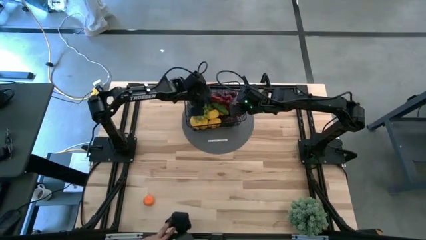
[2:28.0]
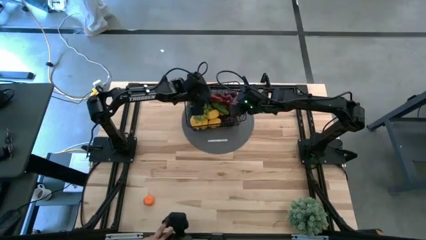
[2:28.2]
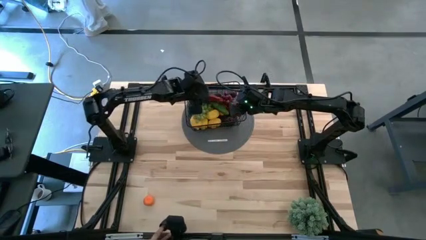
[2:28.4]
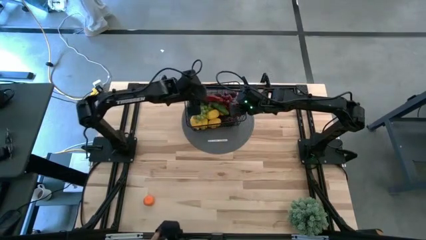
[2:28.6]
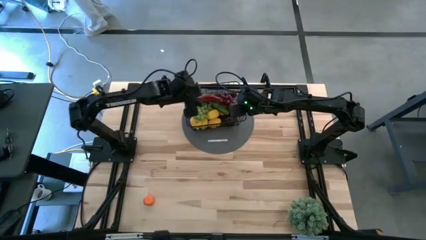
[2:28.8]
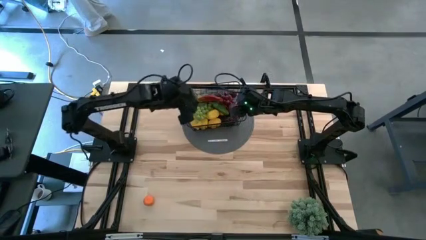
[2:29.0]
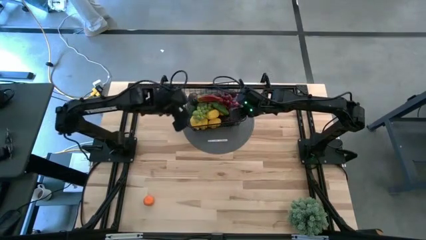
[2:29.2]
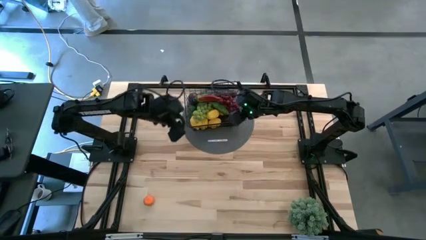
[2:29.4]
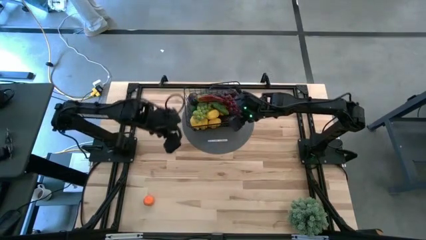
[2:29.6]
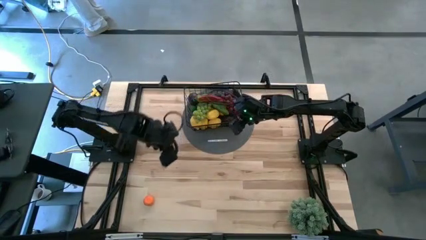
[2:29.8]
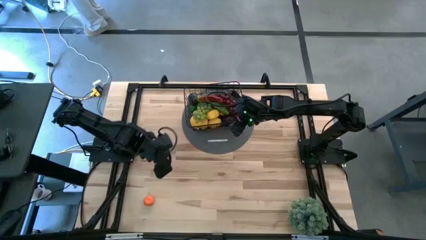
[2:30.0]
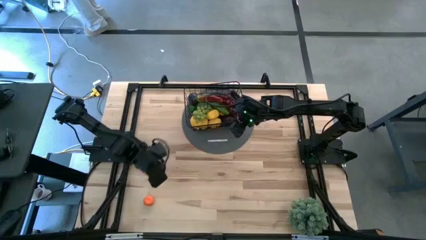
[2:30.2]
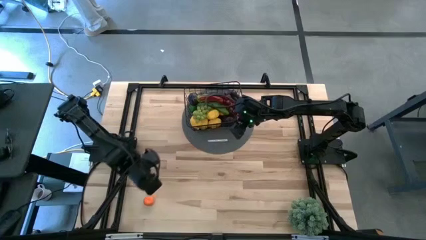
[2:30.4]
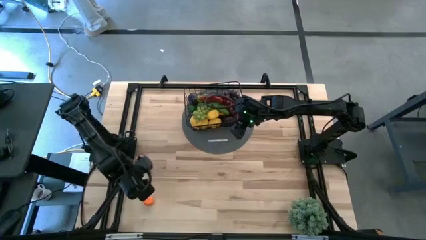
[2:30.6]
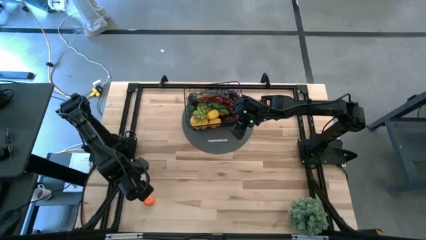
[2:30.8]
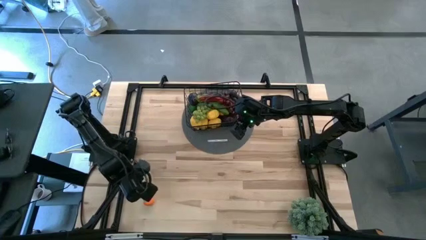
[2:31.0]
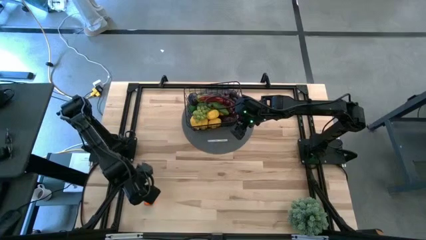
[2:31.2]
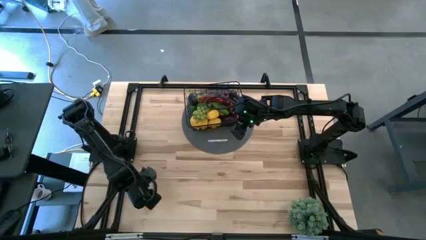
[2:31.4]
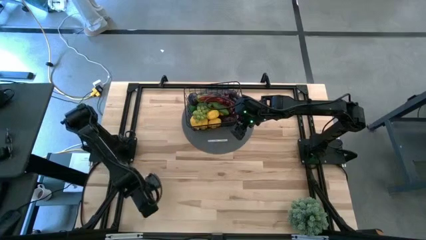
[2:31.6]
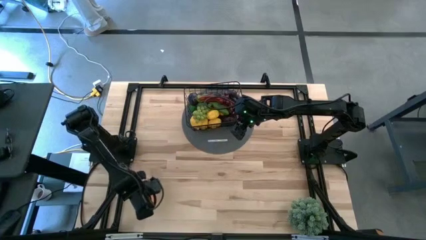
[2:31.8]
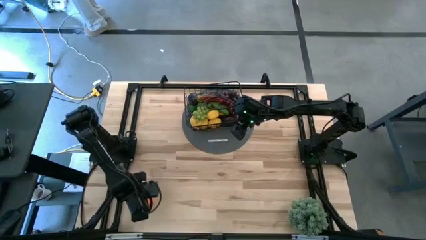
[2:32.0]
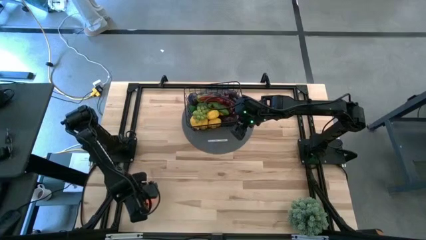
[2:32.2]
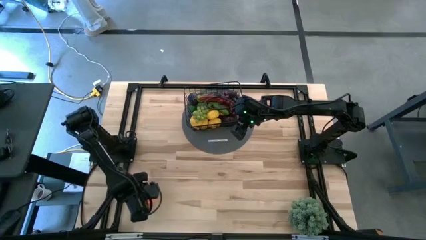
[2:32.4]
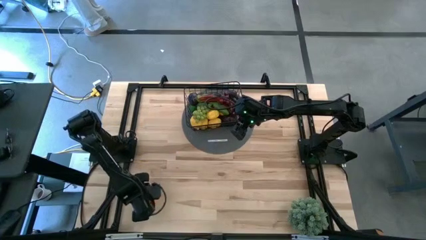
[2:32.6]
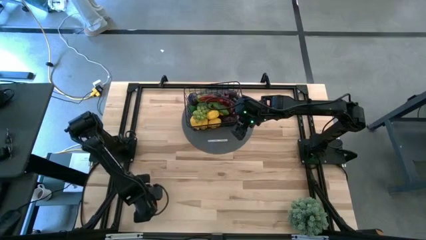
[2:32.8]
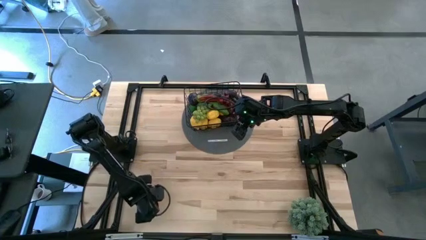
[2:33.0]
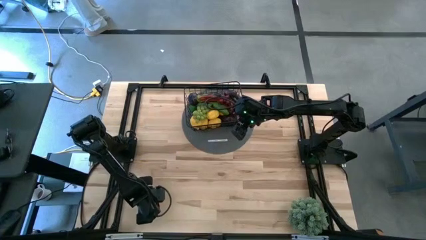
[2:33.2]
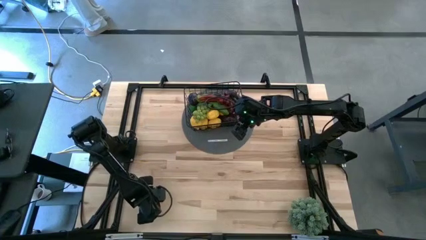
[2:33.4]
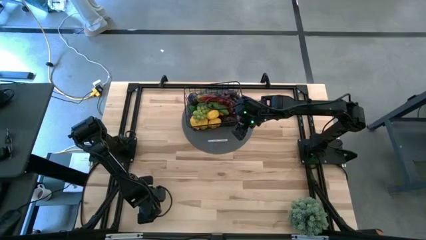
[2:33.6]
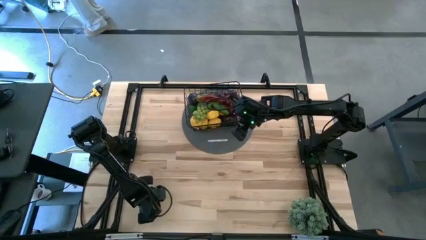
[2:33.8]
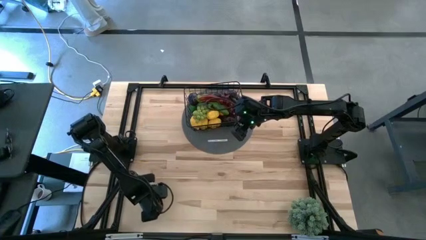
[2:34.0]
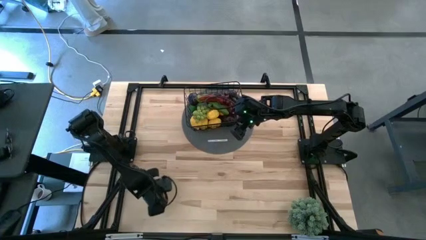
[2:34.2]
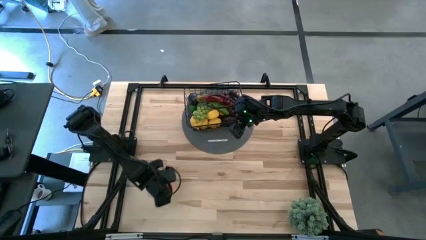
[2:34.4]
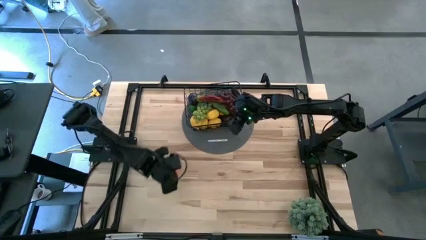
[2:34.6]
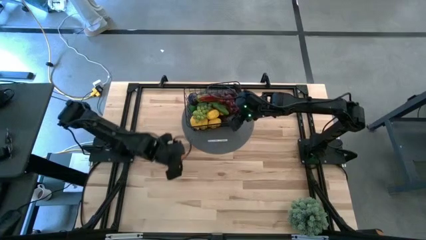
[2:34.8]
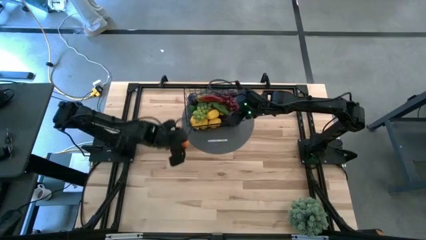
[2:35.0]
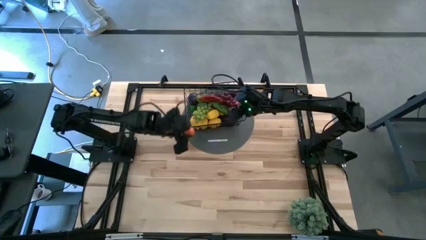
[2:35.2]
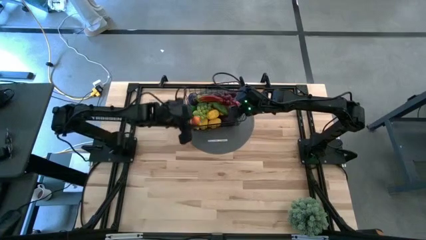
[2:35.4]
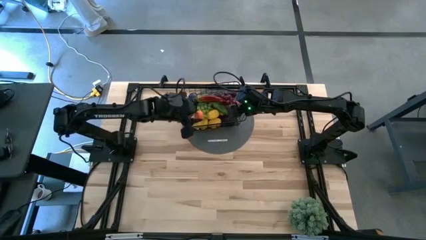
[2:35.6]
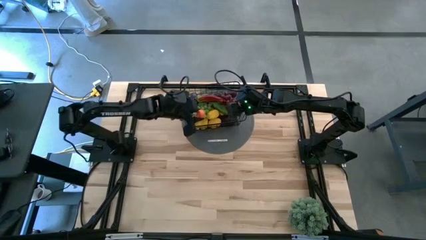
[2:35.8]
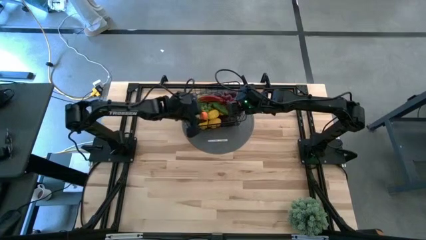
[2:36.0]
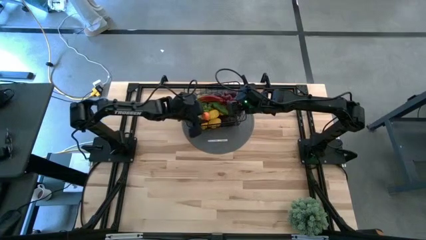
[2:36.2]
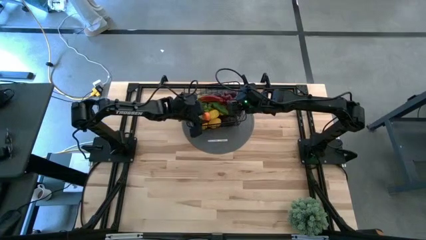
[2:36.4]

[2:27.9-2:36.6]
Task: Build produce basket
Put the orange into the wire basket

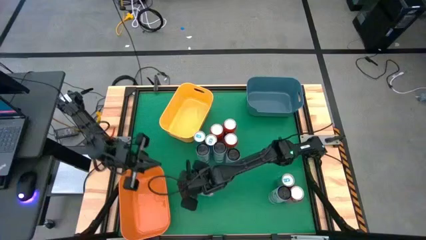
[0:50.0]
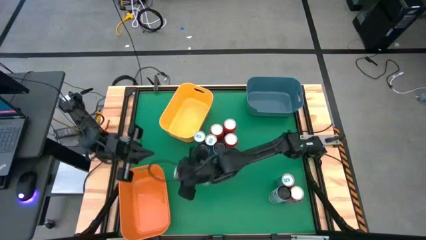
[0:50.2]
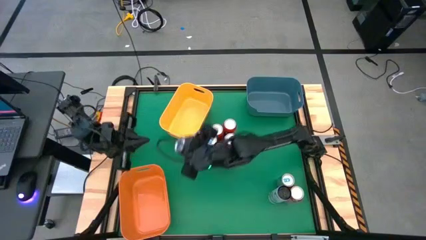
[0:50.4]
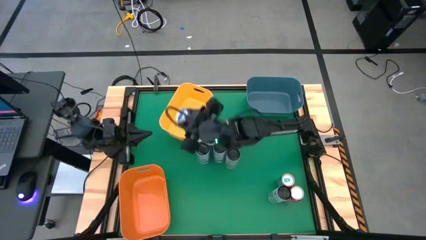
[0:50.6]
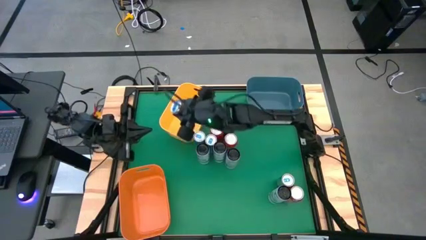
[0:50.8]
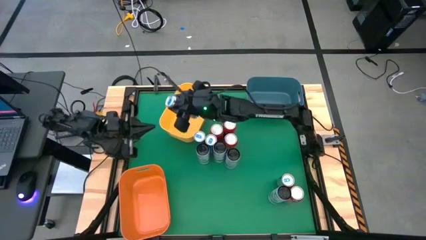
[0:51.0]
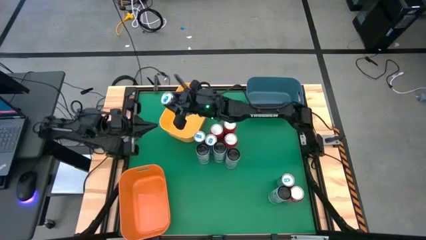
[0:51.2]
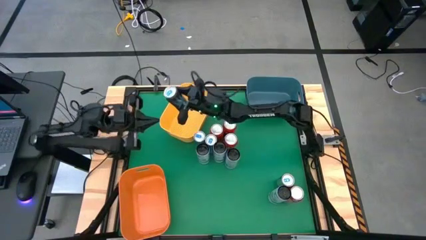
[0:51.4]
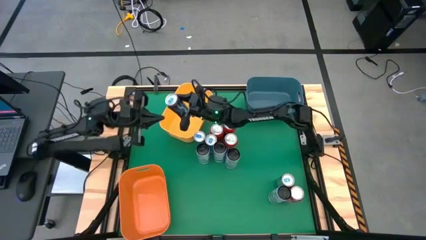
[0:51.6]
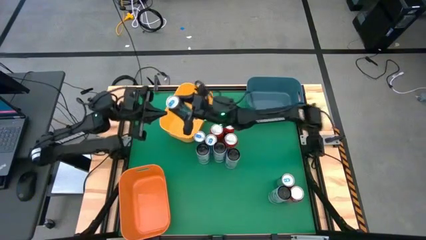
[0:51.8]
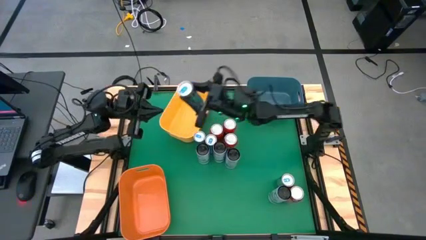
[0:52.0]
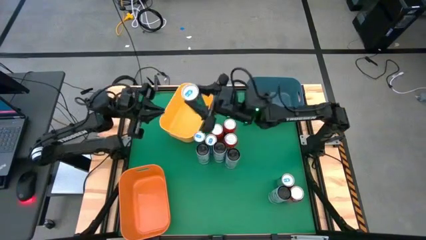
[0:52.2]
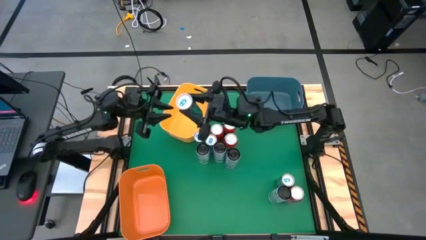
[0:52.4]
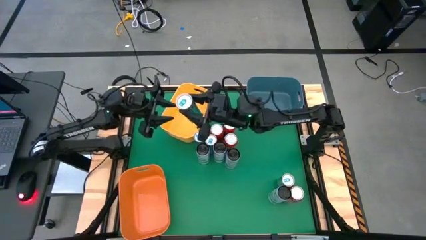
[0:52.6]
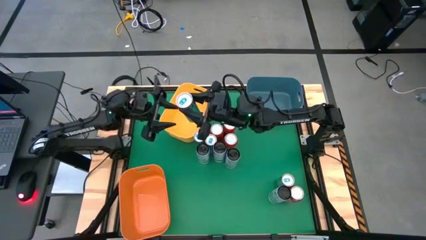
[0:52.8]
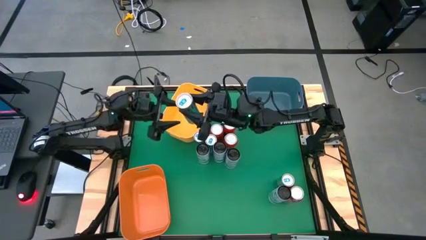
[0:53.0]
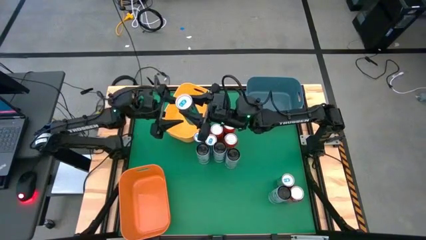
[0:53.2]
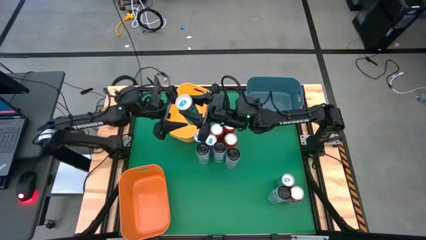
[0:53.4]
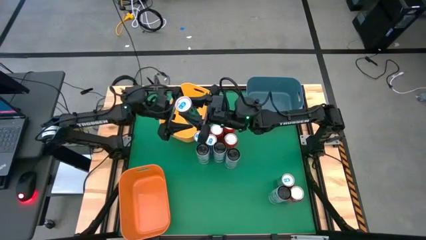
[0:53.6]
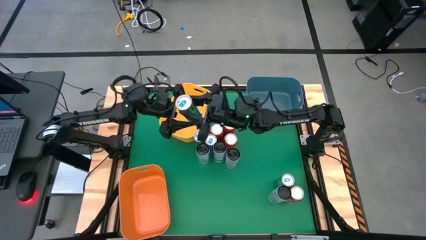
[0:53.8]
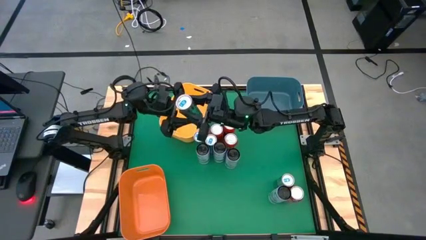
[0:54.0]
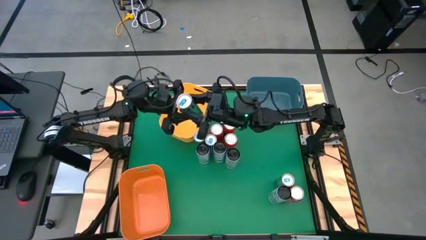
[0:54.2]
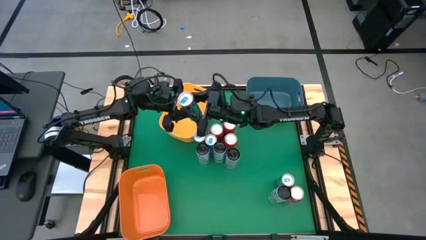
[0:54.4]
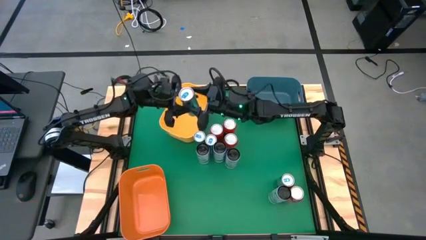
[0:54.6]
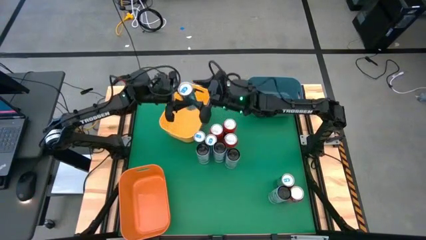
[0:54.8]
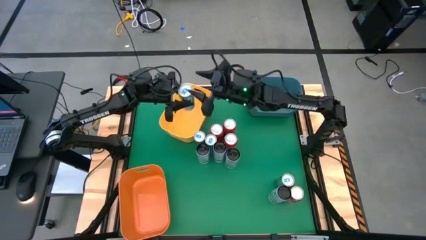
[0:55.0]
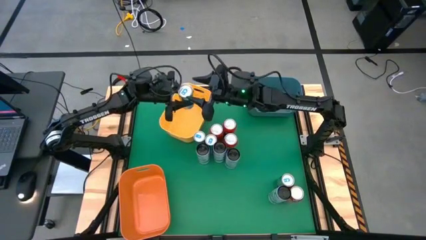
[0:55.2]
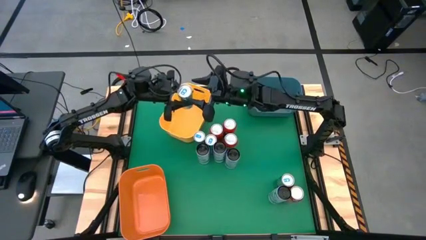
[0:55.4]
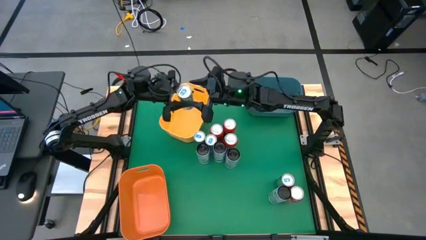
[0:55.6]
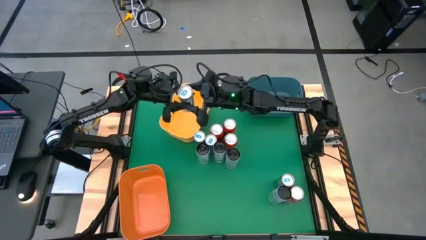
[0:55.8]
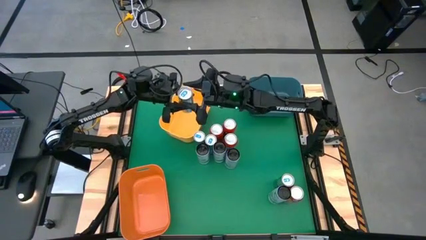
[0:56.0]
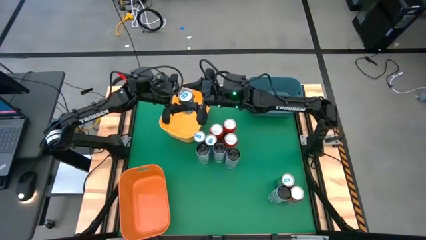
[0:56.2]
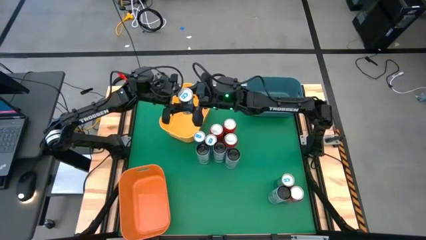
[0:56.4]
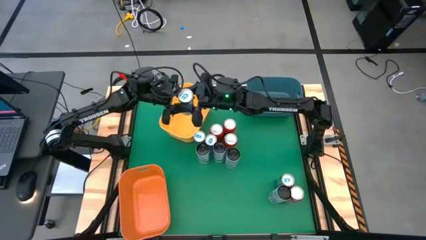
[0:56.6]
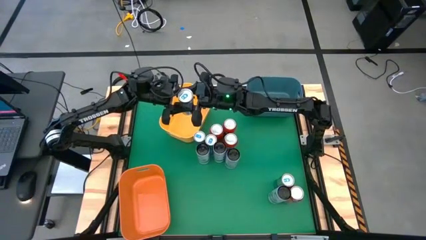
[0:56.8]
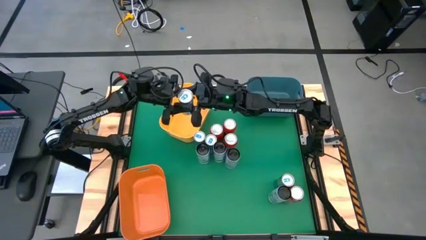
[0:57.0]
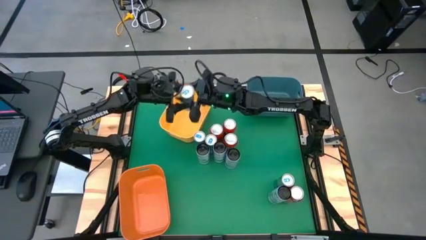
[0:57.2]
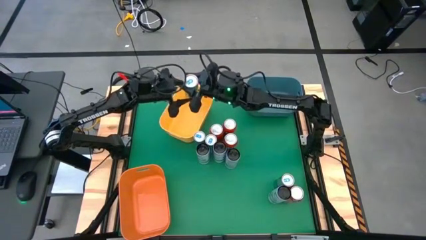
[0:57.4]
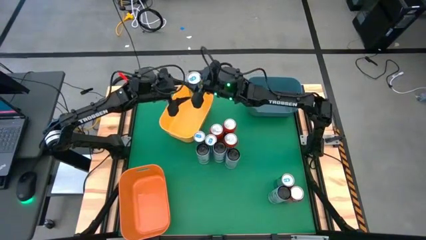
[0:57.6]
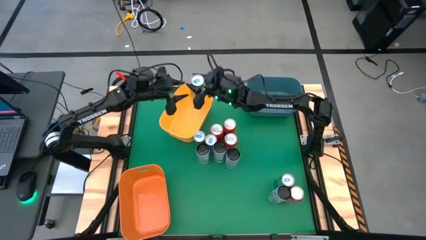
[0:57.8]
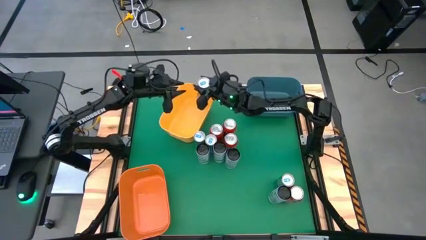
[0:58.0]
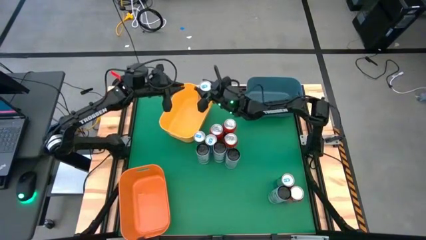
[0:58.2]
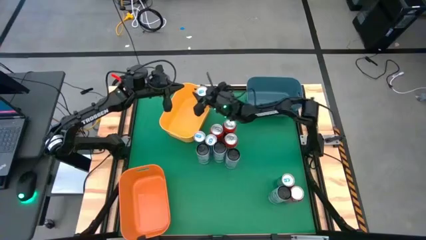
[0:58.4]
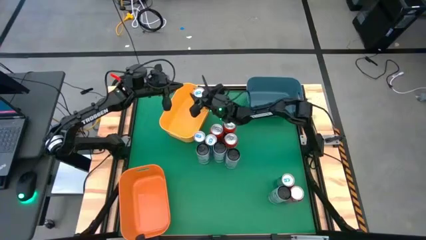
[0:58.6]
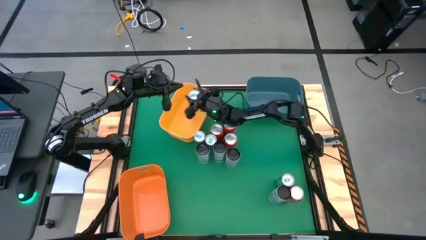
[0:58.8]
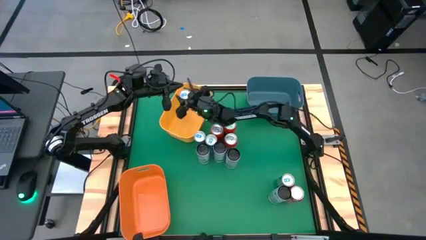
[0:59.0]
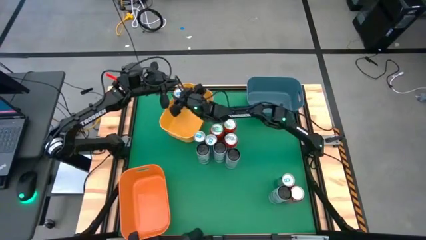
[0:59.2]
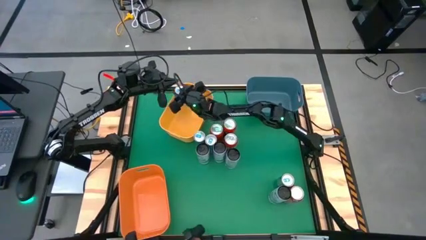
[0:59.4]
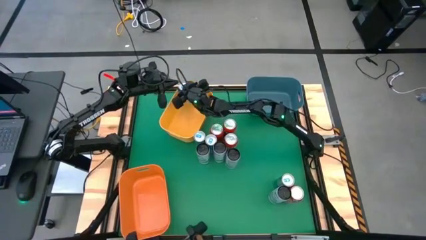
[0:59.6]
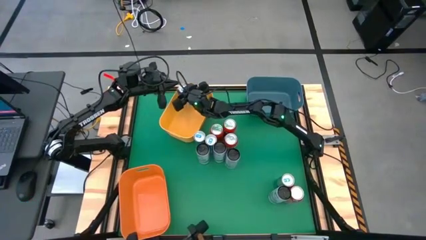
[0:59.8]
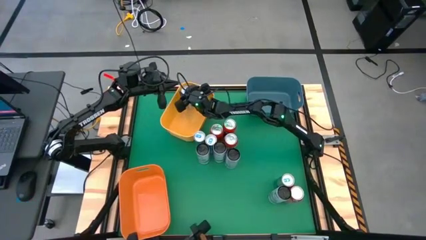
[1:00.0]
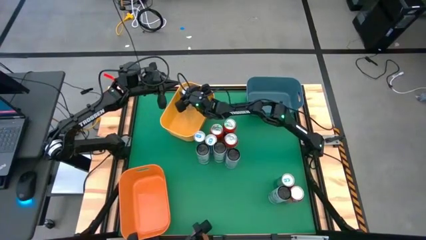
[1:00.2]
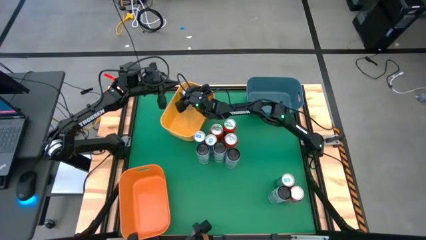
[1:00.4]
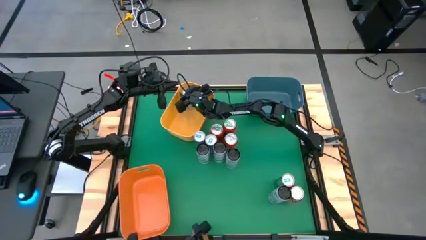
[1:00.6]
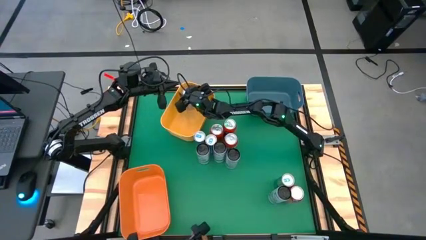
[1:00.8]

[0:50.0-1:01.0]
Task: Sort soda cans
Put the blue soda can into the yellow bin
